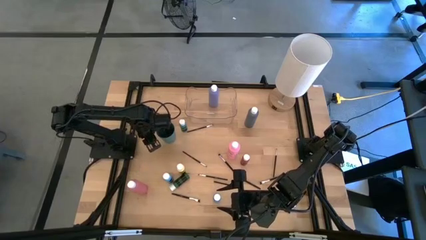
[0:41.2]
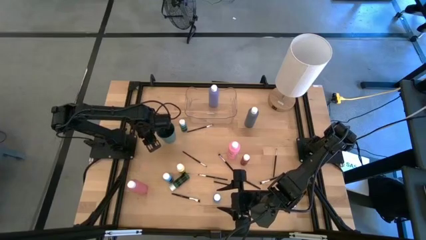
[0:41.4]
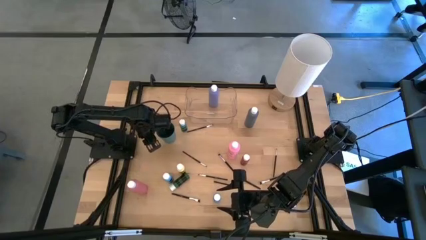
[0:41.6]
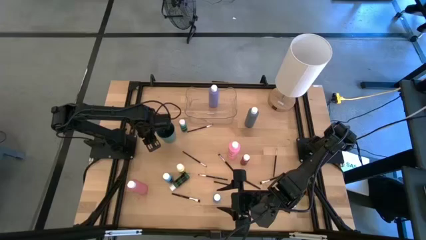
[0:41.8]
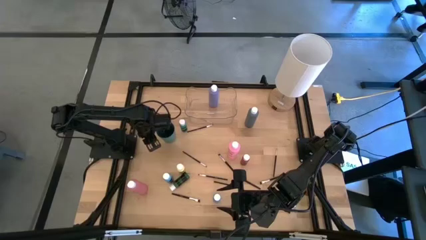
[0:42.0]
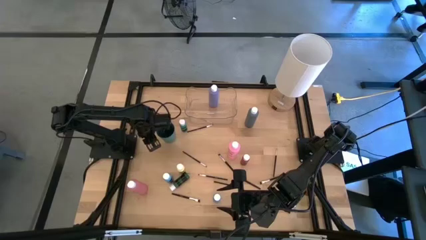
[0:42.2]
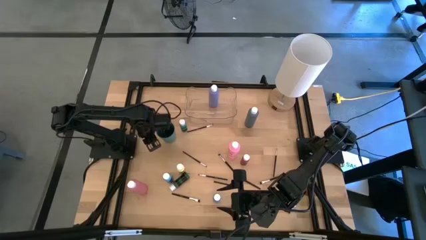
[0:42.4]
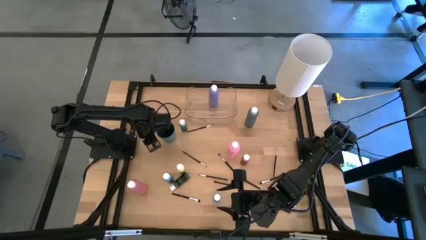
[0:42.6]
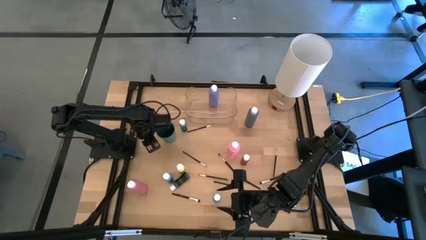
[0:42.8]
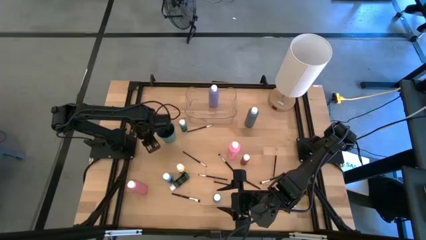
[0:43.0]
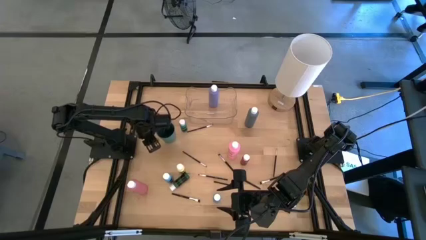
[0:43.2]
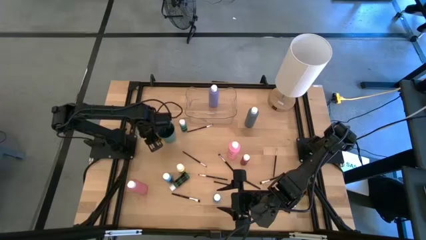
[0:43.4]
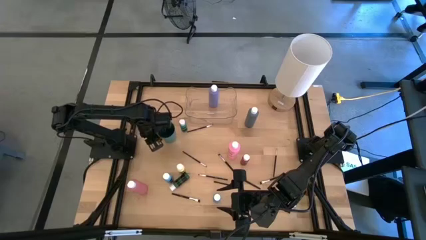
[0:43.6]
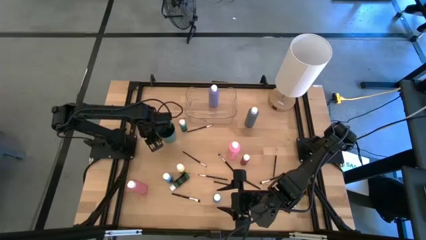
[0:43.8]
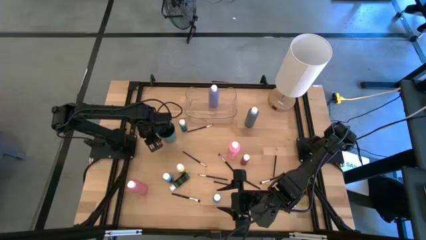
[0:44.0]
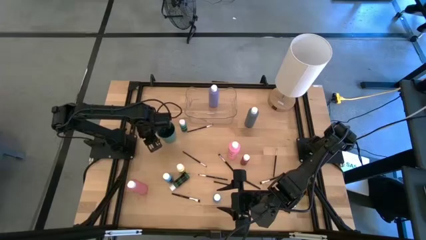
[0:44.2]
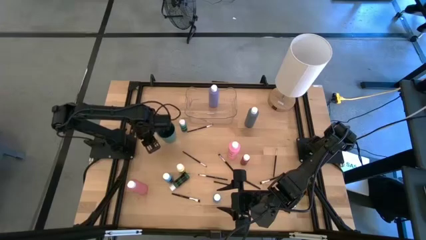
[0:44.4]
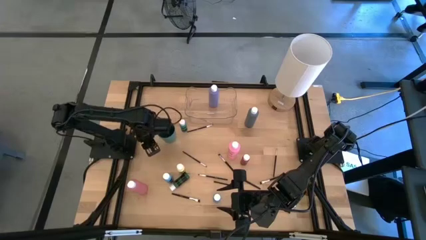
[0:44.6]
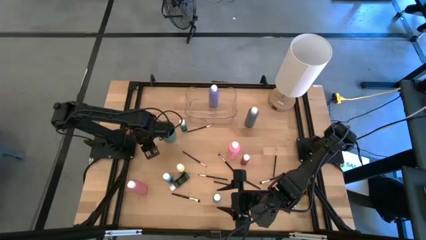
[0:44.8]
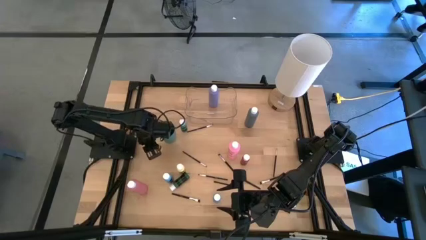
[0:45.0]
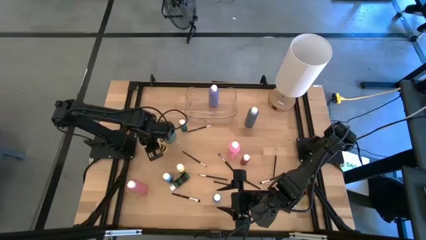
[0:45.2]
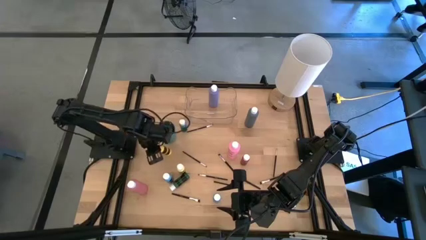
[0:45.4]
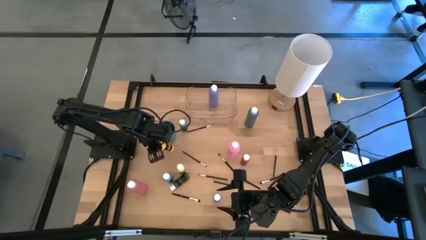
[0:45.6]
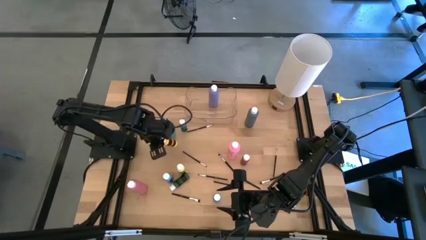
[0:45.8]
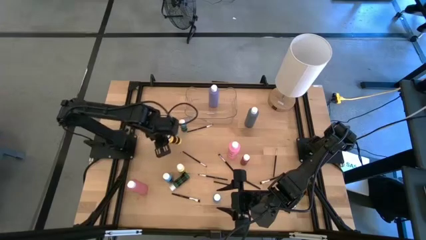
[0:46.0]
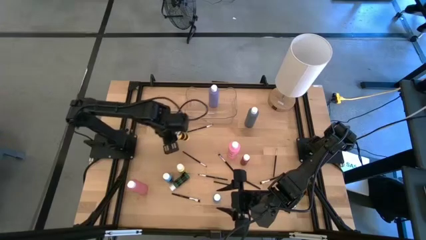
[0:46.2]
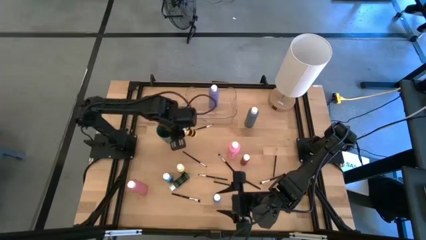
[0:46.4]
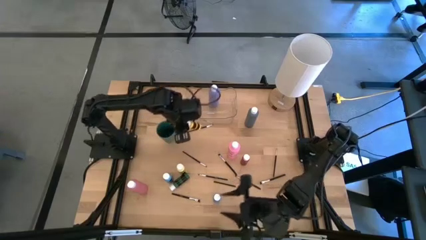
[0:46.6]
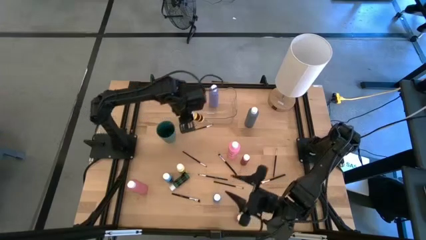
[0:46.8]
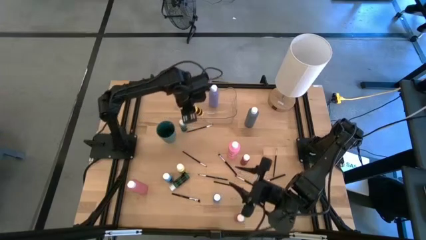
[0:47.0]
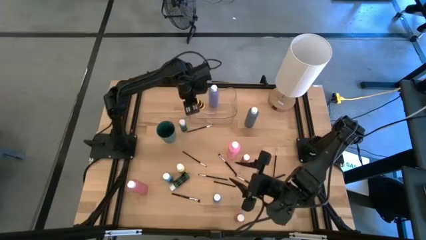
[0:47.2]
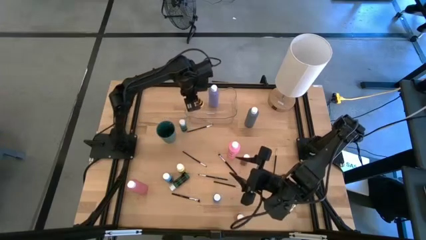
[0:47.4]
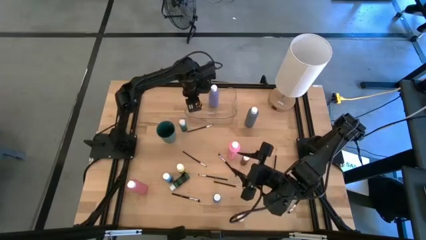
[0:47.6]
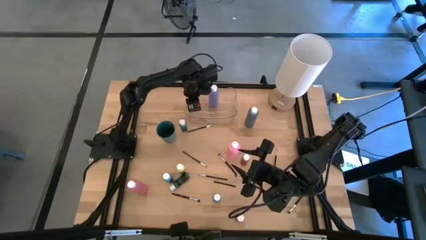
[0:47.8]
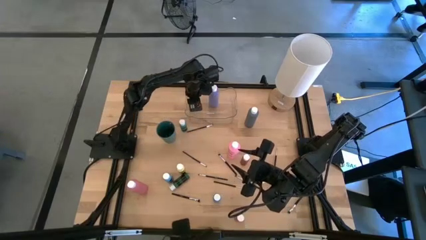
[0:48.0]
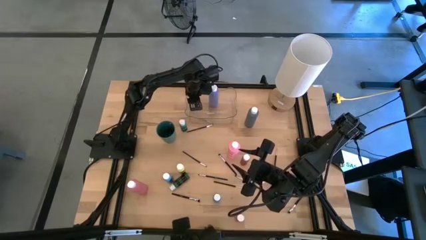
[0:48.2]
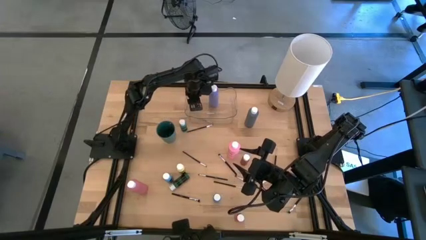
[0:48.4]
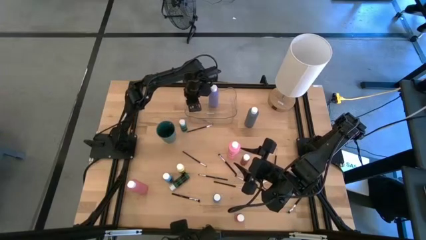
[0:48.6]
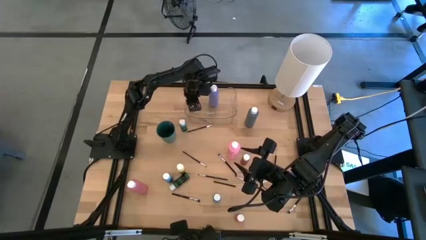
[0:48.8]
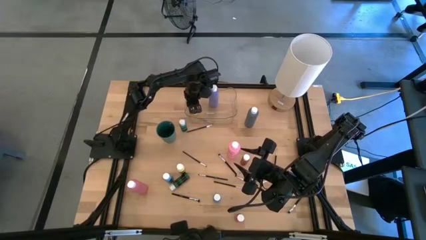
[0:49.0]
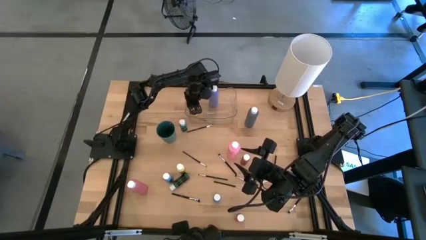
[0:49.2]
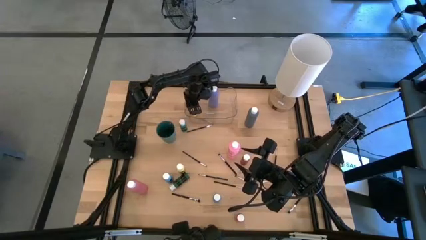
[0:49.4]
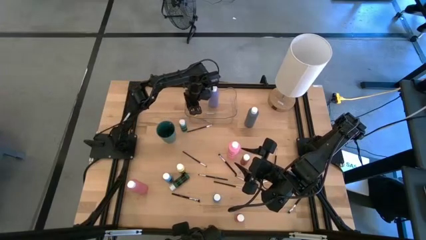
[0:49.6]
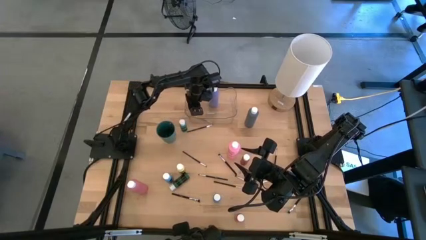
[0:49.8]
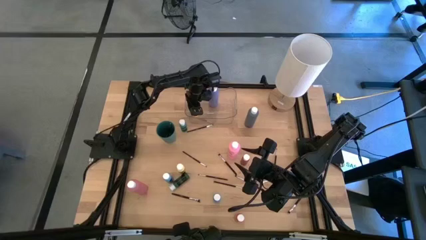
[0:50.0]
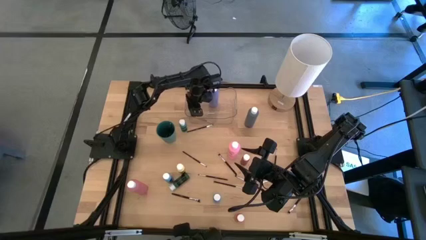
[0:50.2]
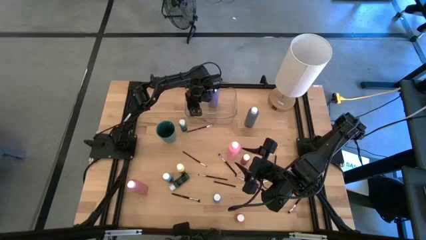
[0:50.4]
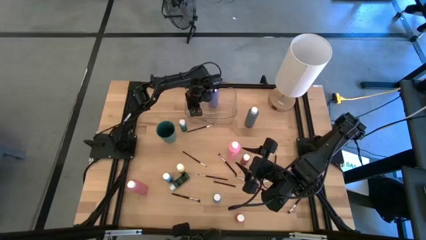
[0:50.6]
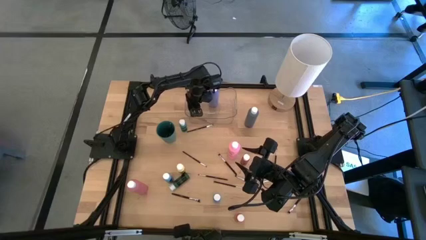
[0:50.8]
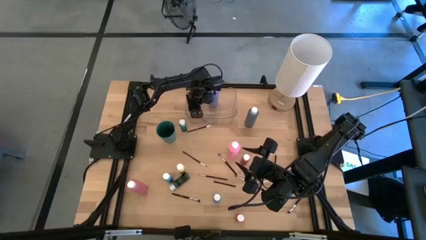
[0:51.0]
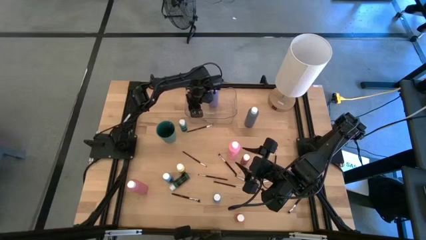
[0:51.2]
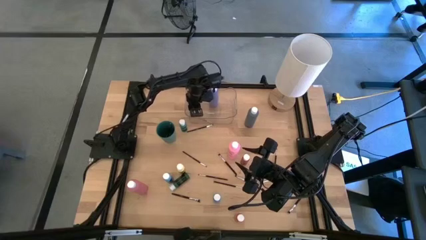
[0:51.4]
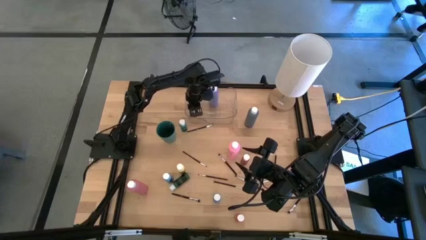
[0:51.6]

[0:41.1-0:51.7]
Task: Pick & Place Paint Supplies
Put the yellow paint bottle into the transparent bin

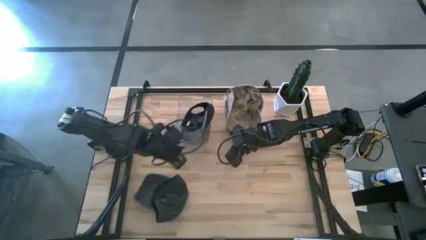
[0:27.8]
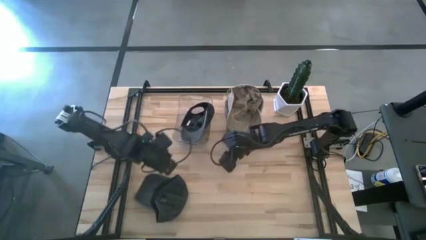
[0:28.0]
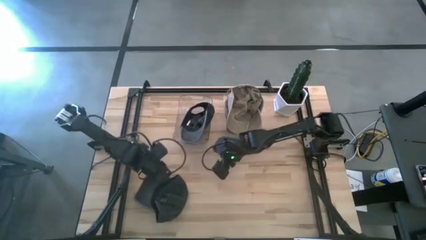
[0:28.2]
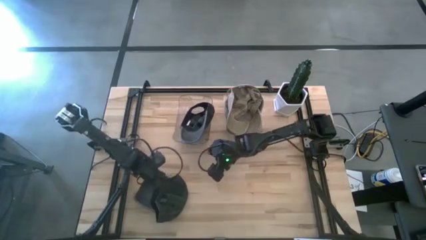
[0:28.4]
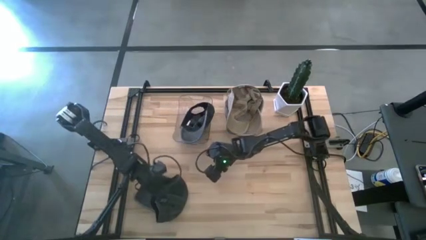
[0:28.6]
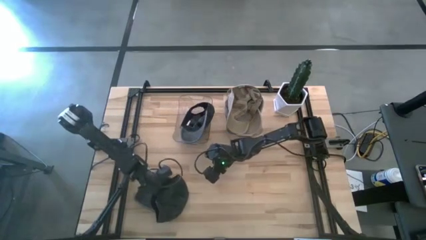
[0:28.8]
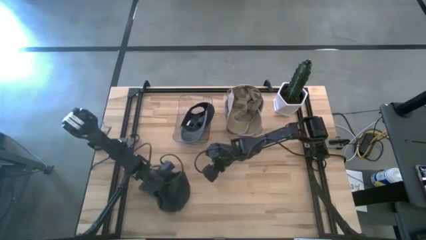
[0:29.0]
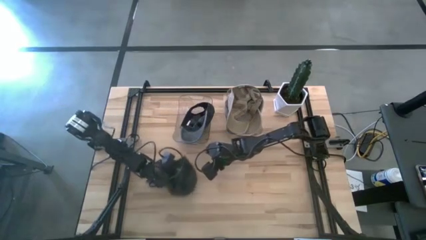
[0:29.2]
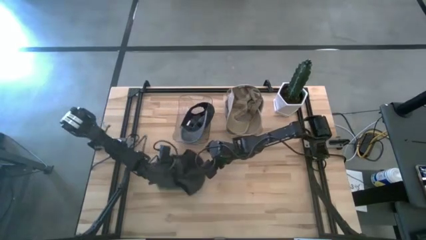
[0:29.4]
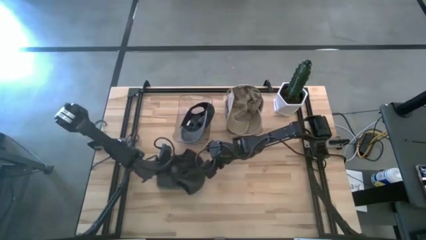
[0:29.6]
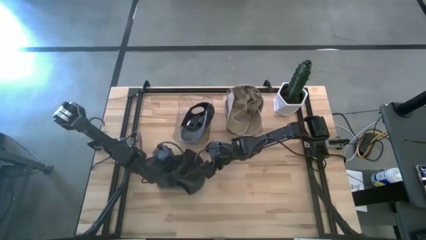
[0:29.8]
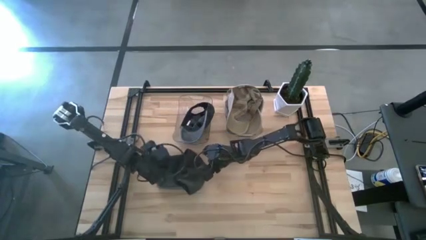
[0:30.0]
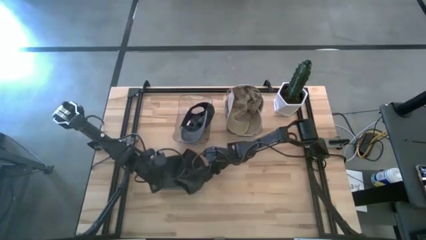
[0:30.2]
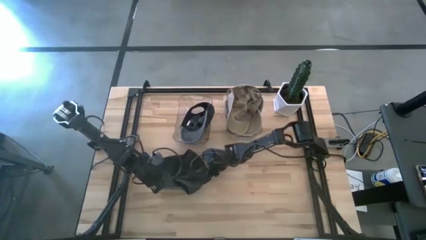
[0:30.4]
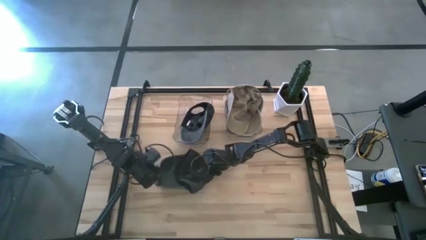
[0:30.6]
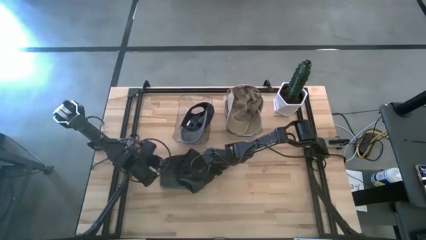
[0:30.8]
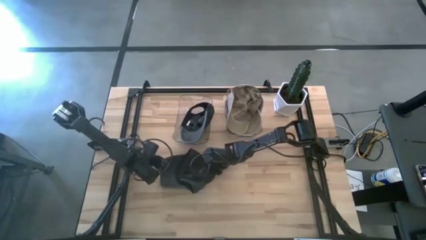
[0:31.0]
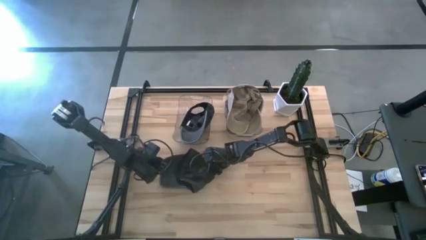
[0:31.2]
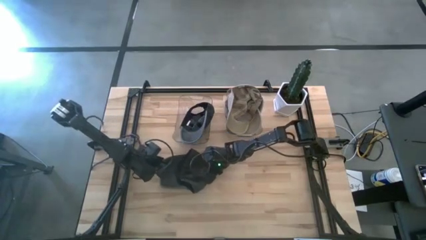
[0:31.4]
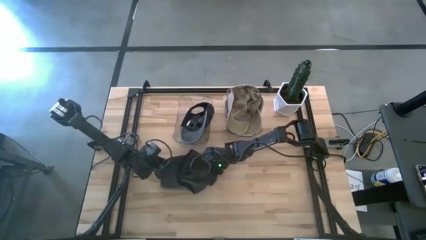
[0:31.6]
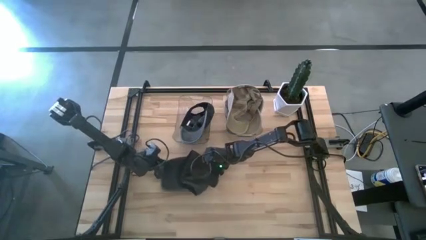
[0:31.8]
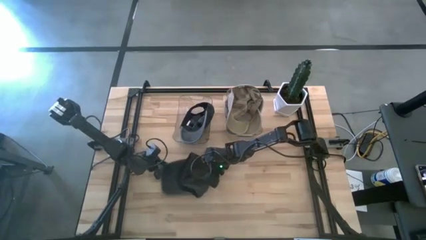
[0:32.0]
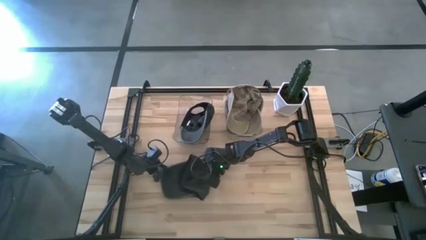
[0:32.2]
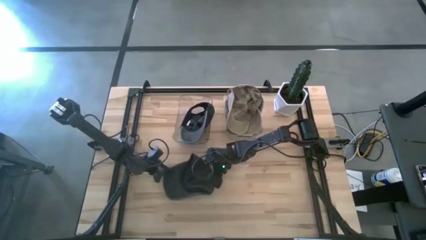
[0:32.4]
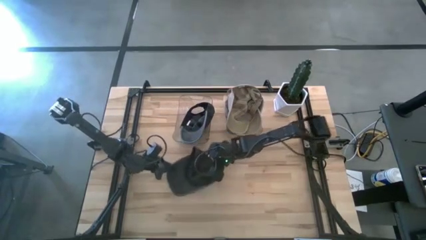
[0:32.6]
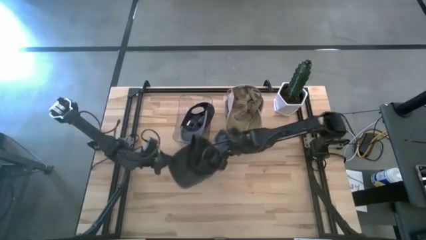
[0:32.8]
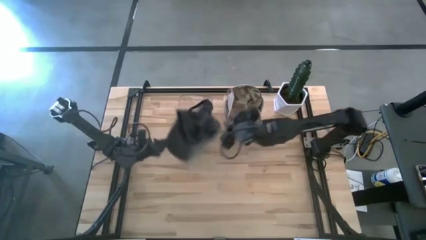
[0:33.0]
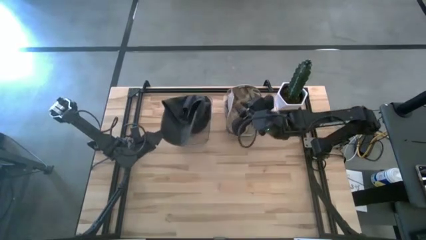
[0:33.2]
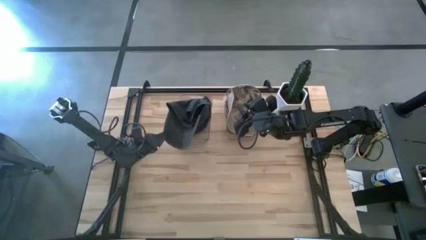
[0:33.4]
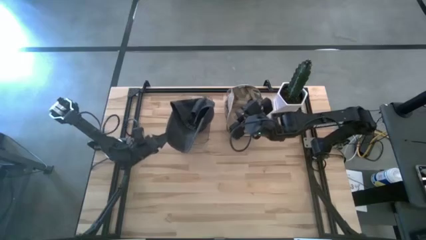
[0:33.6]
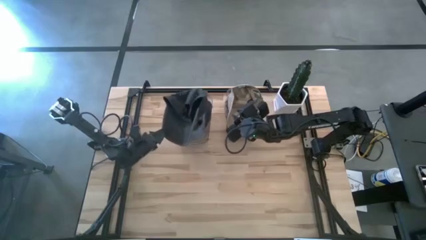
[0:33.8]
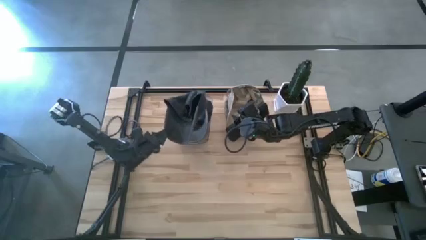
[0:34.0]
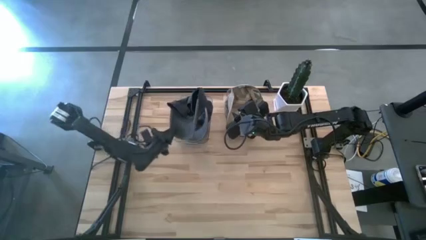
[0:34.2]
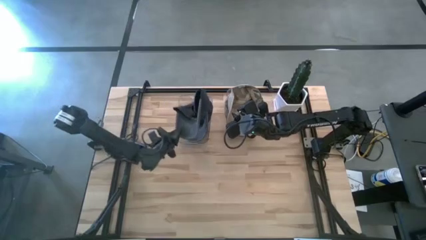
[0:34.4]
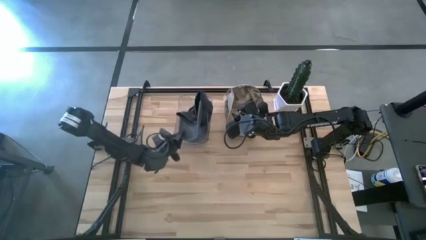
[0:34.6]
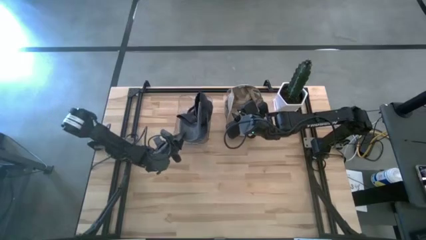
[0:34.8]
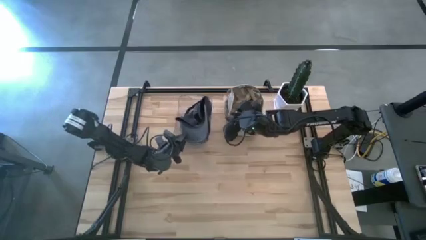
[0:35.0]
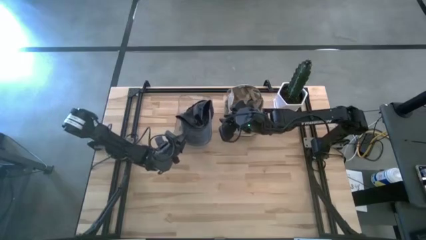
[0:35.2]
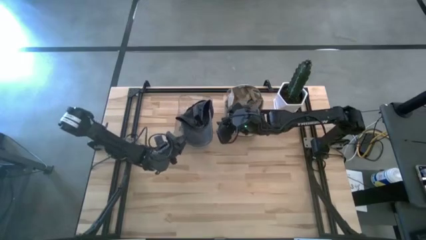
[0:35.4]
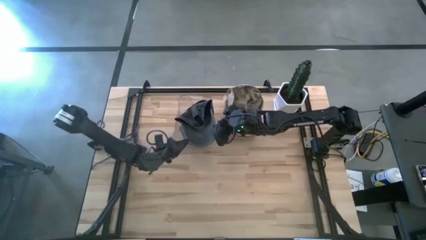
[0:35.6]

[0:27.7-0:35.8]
Task: Pick & Place hat
Put the black cap into the left transparent bin
